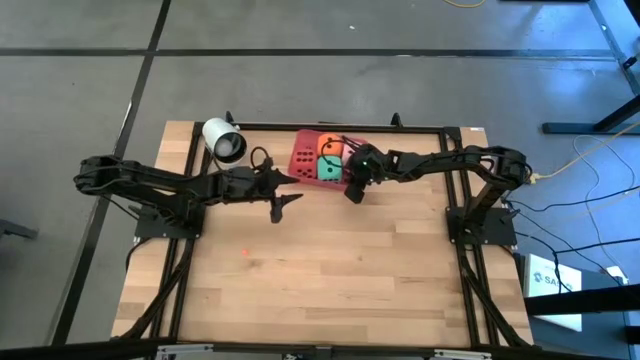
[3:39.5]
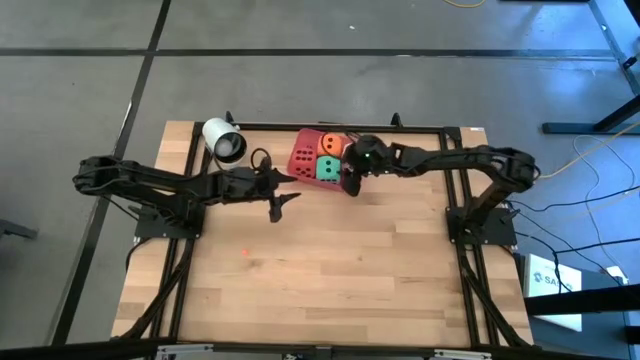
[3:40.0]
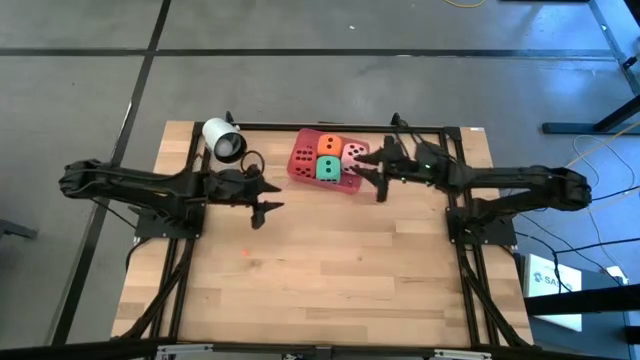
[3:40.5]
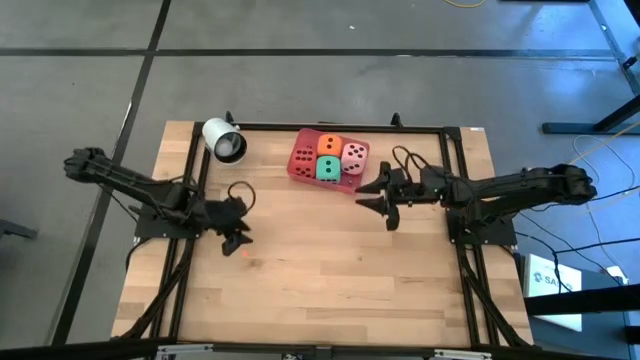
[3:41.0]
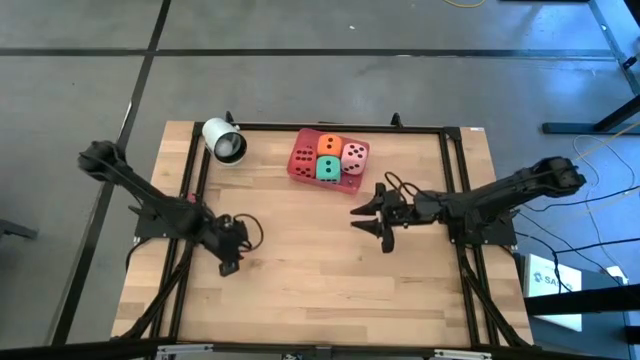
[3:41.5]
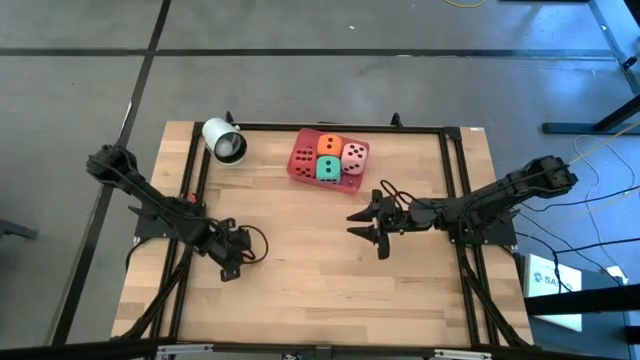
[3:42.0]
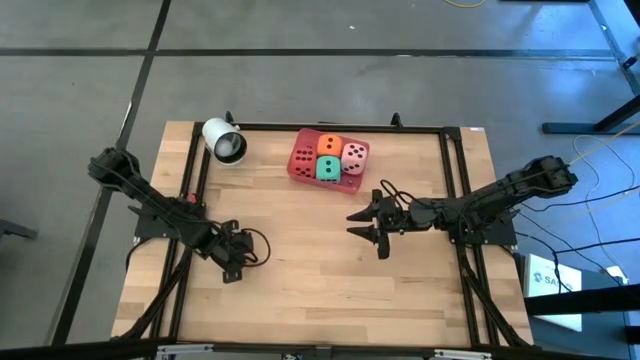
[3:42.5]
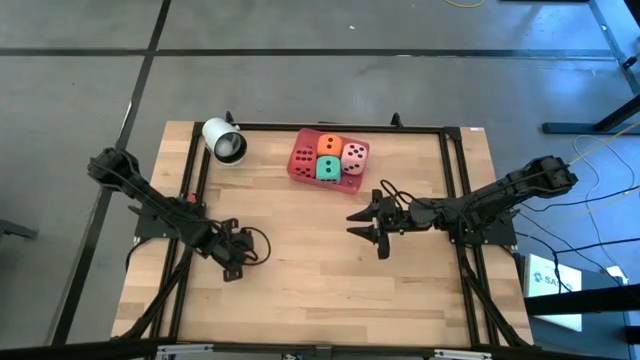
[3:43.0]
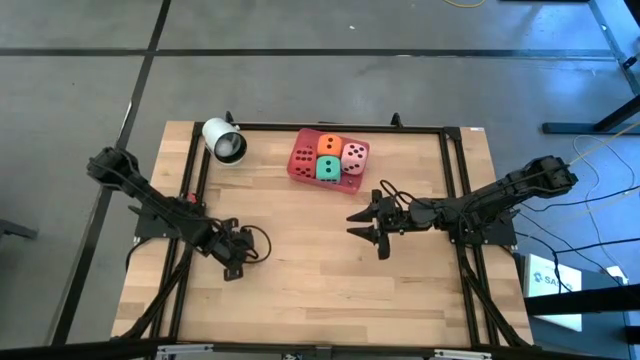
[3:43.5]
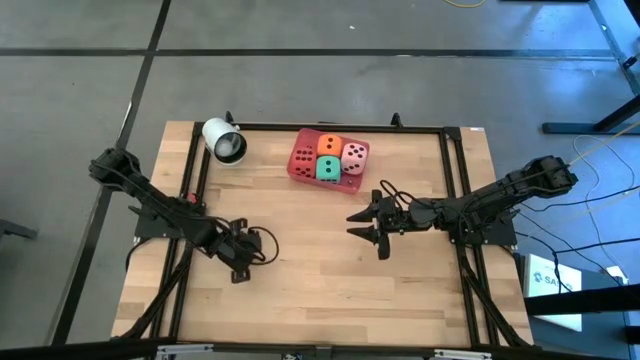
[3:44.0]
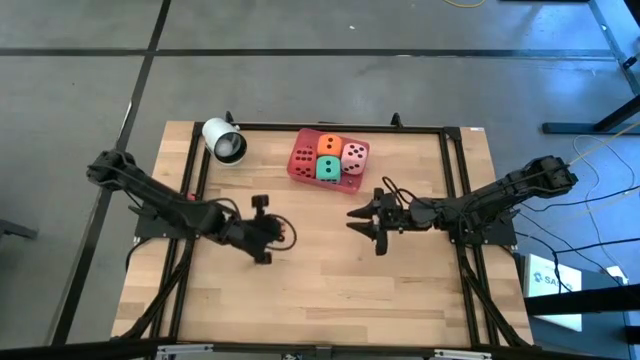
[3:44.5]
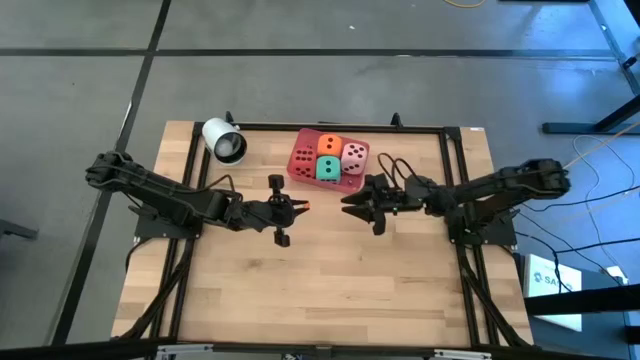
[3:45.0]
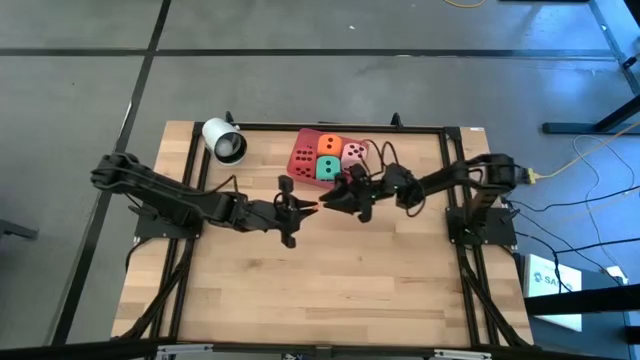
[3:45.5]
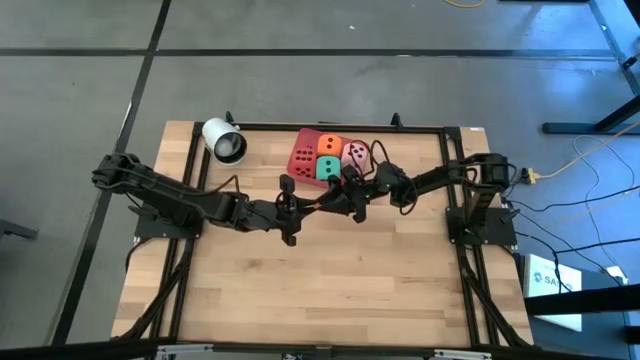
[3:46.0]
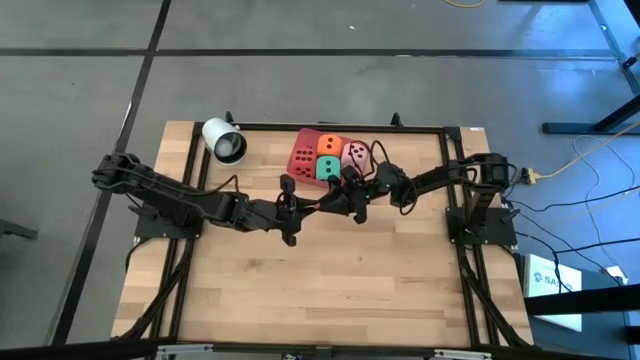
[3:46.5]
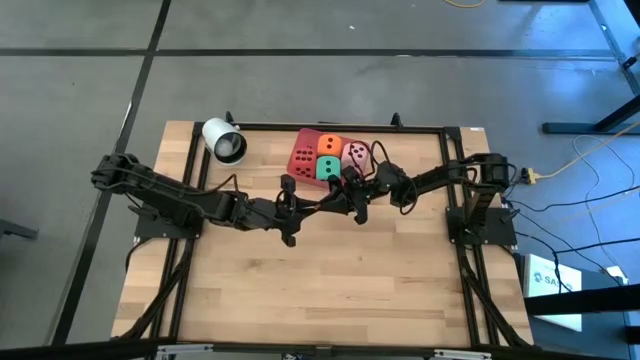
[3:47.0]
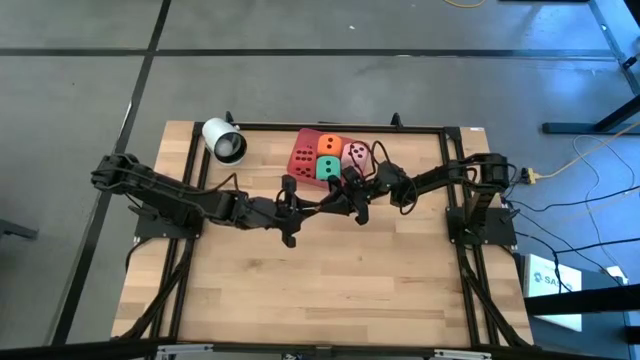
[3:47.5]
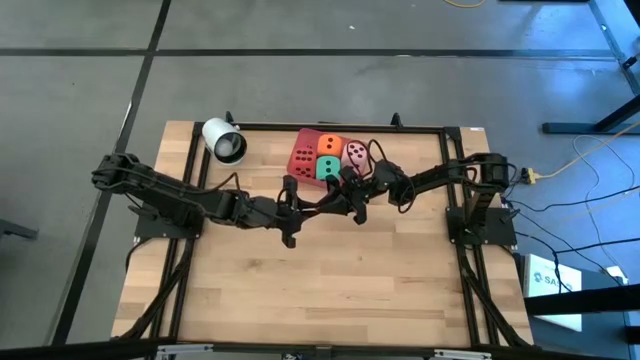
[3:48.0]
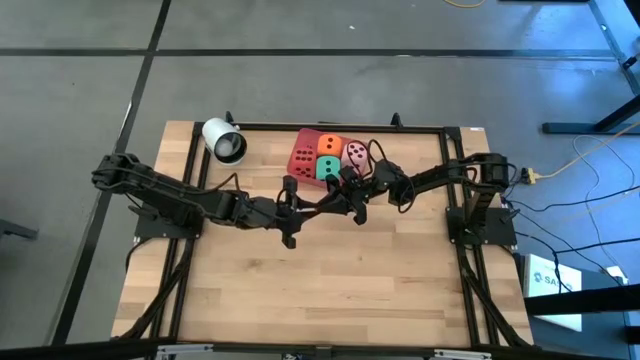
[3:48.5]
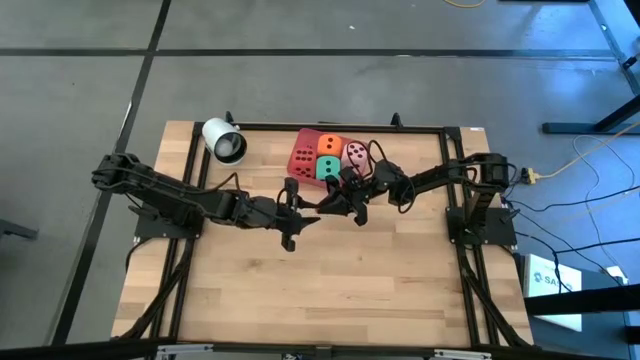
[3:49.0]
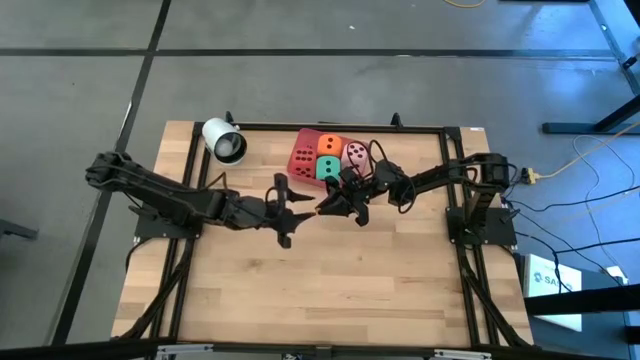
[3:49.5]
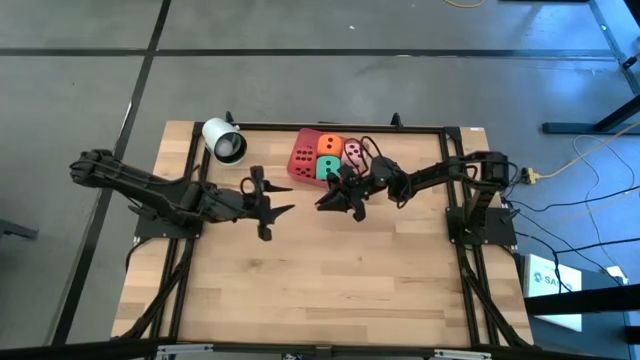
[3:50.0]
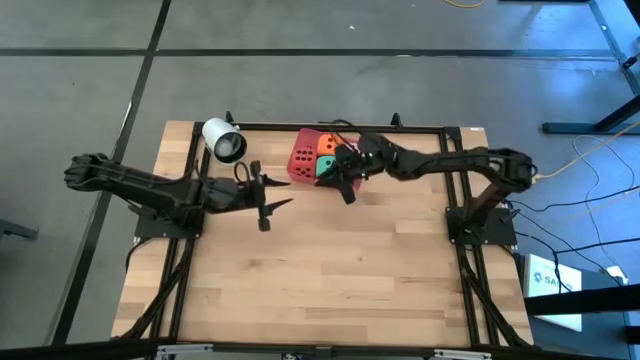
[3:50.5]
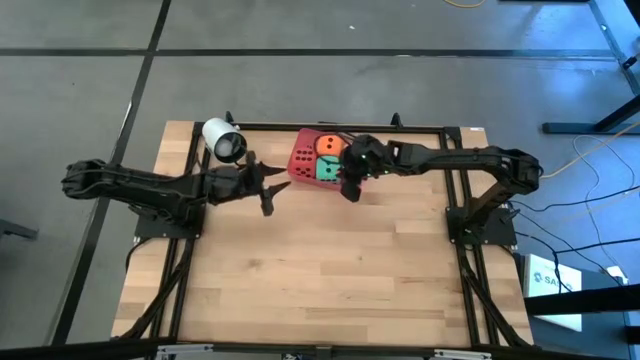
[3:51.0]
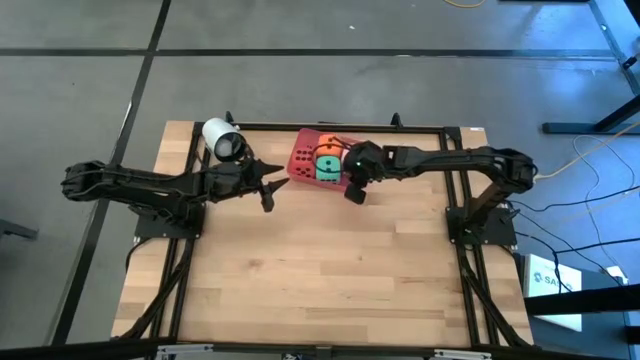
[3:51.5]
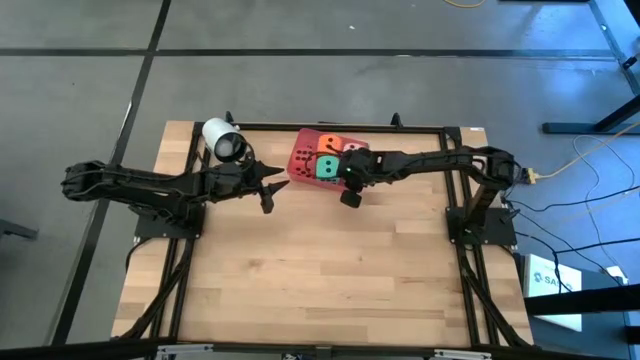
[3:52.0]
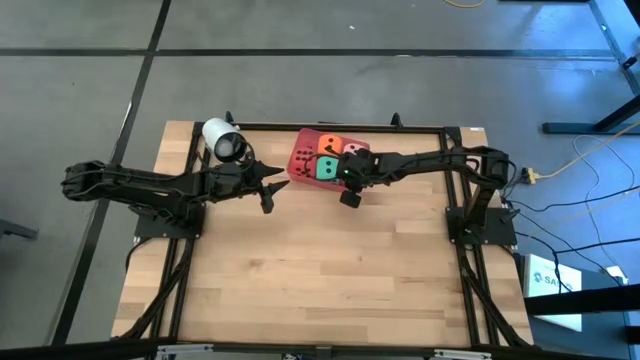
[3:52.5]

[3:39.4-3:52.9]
Task: Pick & Place Dice
Put the orange die into the pink bin

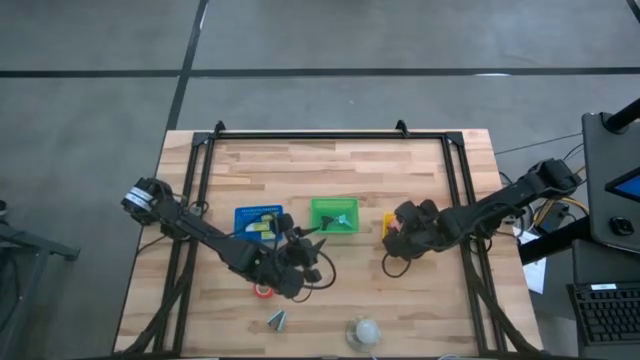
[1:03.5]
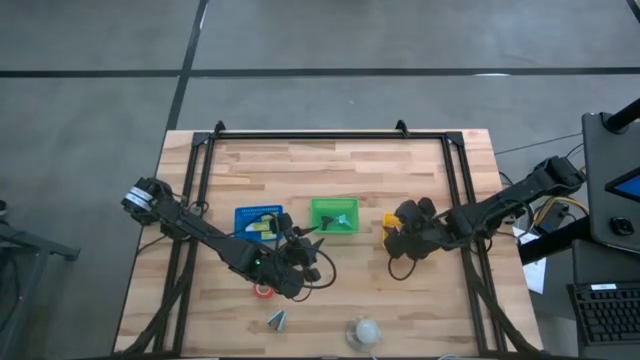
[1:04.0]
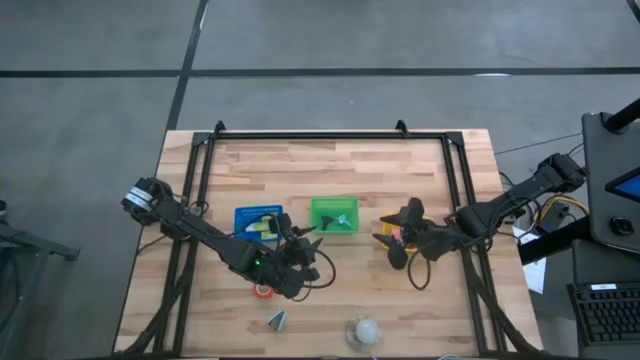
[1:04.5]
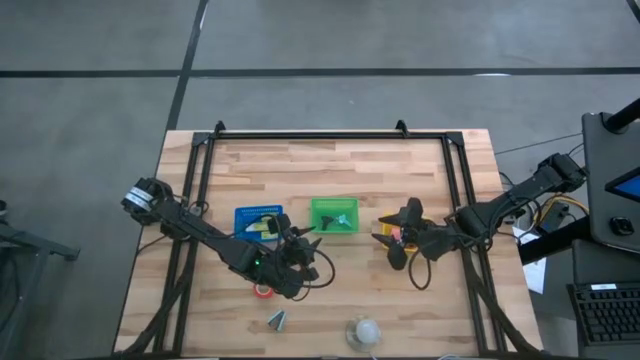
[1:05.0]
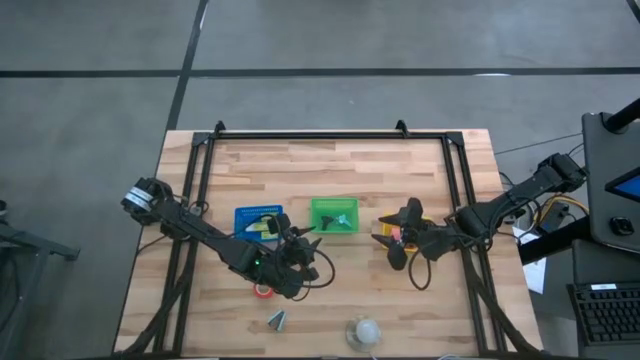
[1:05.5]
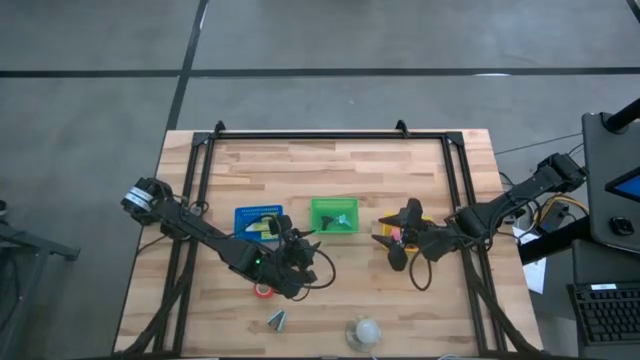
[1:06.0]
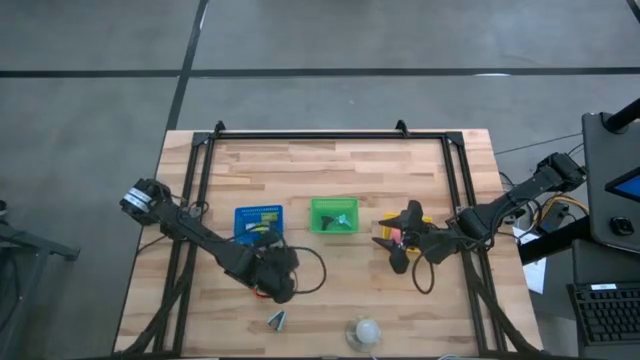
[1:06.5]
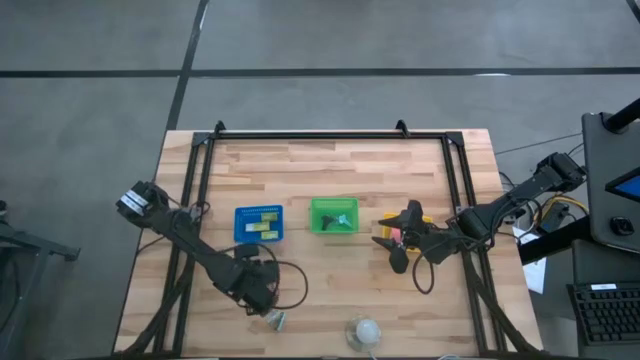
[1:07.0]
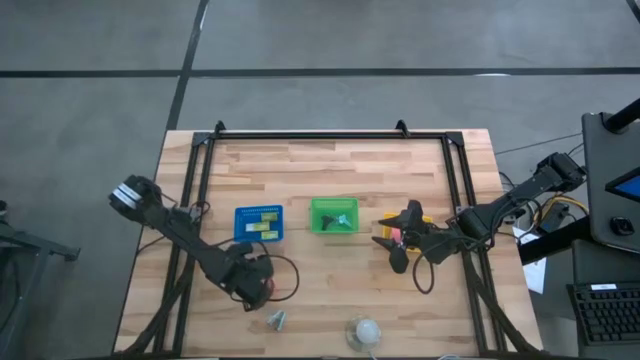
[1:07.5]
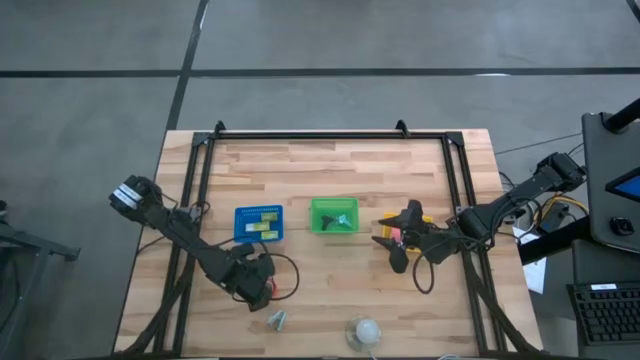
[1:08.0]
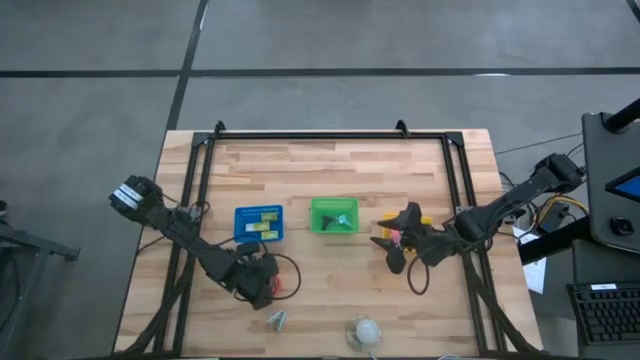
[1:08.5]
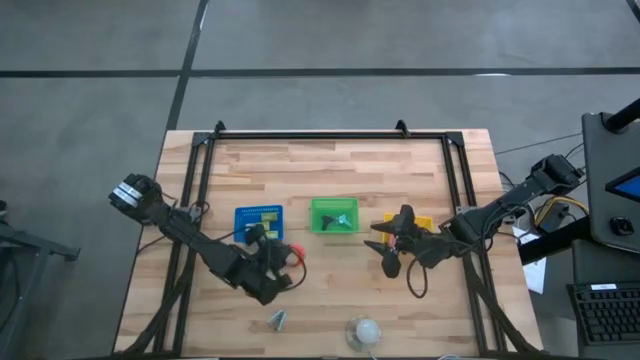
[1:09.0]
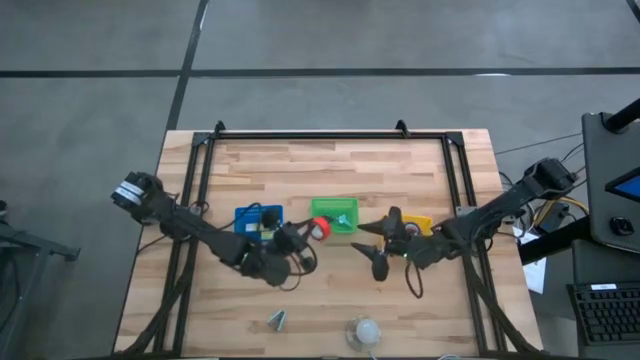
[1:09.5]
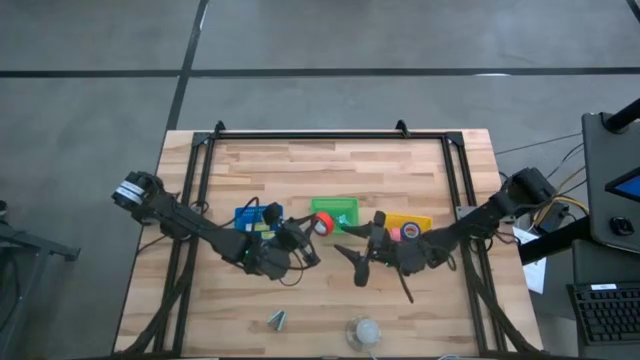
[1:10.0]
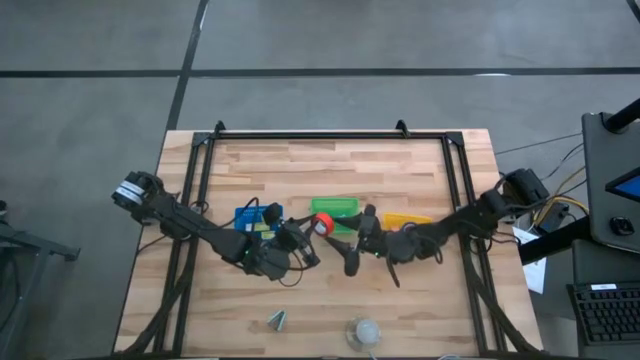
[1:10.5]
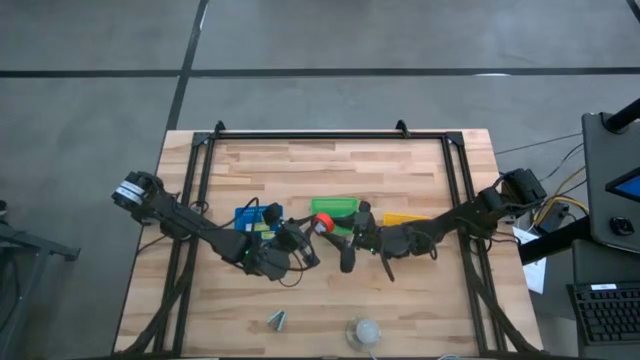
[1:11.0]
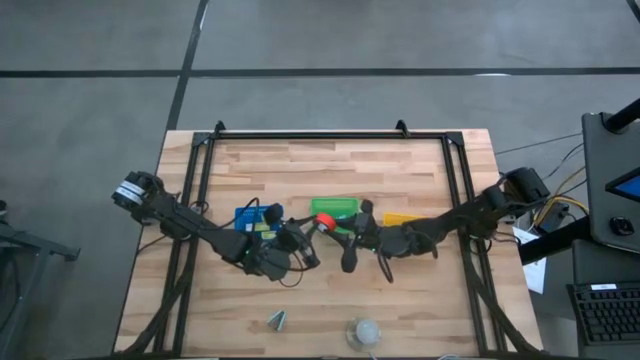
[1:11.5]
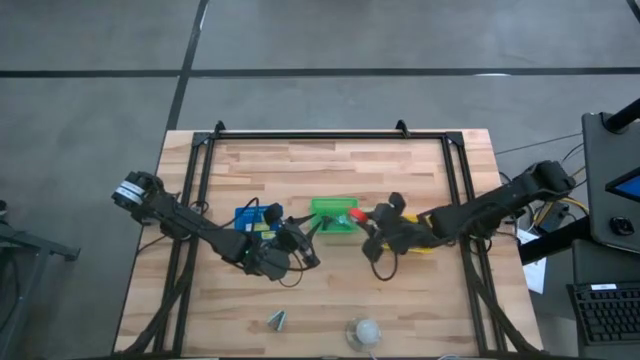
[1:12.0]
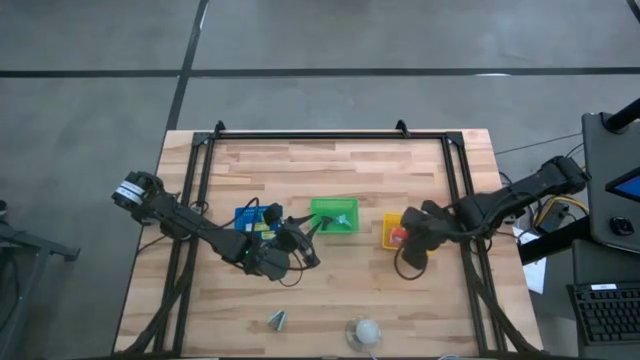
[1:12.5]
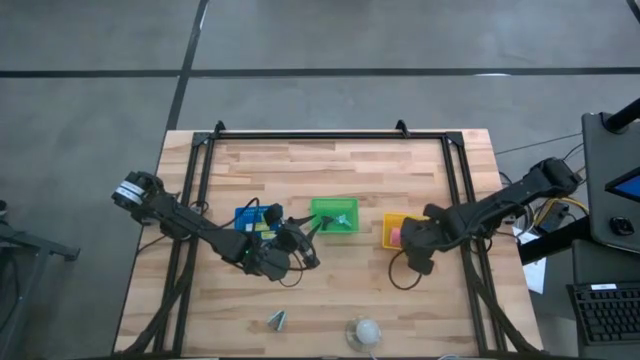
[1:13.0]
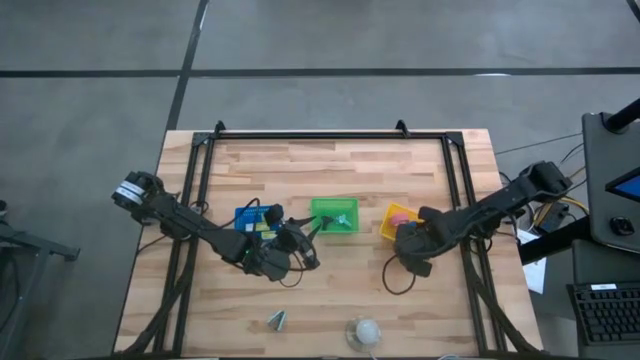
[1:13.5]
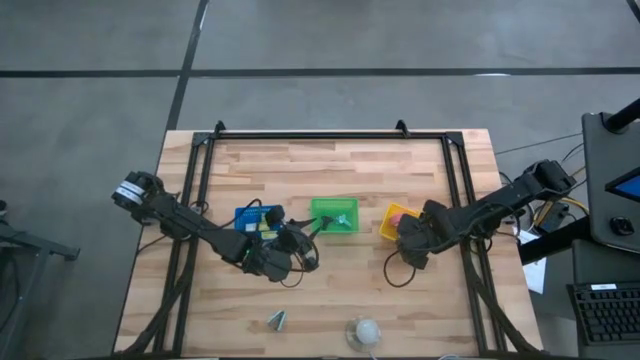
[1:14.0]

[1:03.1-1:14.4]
Task: Pick and place Stapler, Stapler remover, tape
Put the orange tape into the yellow bin
